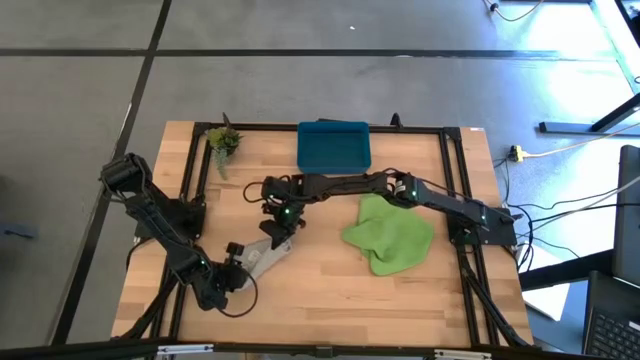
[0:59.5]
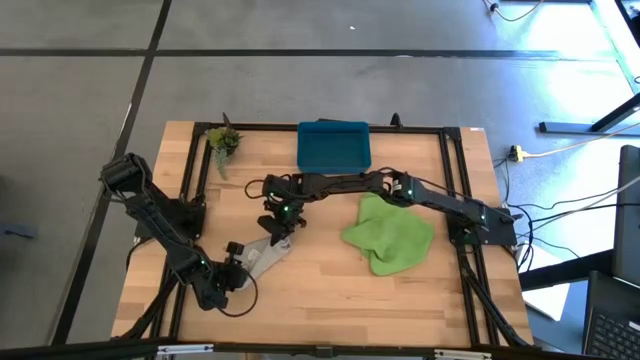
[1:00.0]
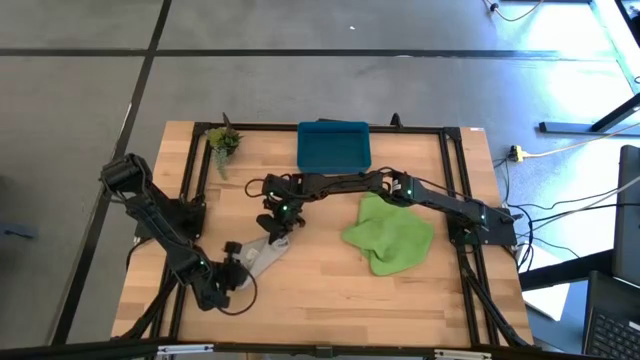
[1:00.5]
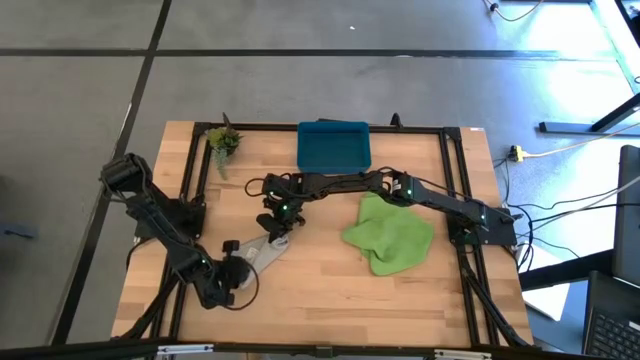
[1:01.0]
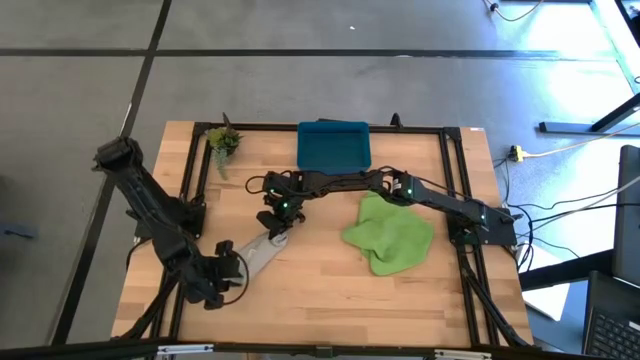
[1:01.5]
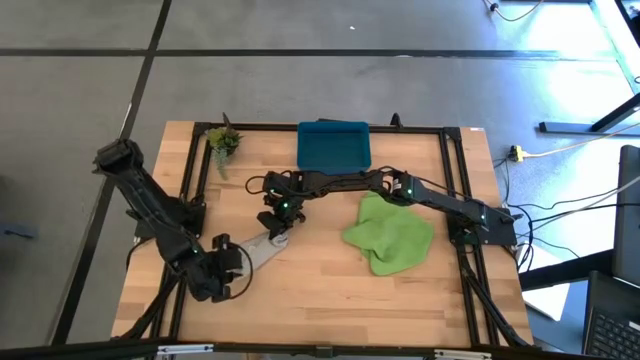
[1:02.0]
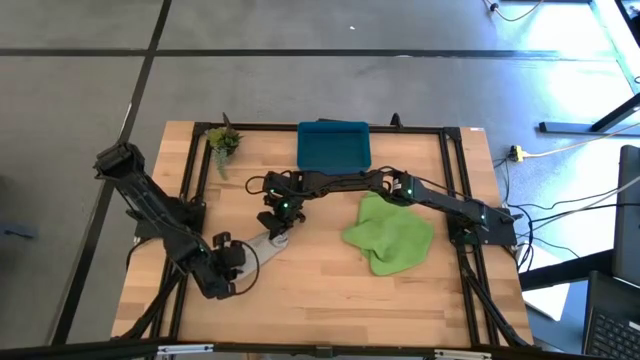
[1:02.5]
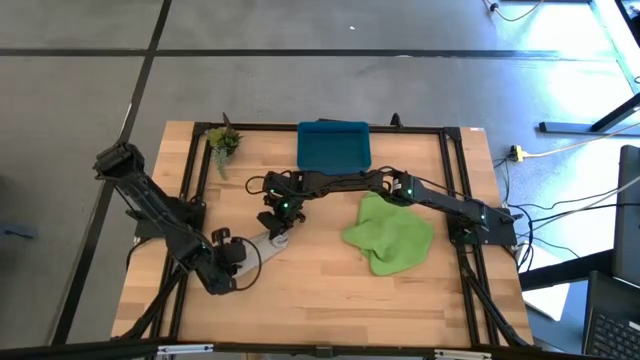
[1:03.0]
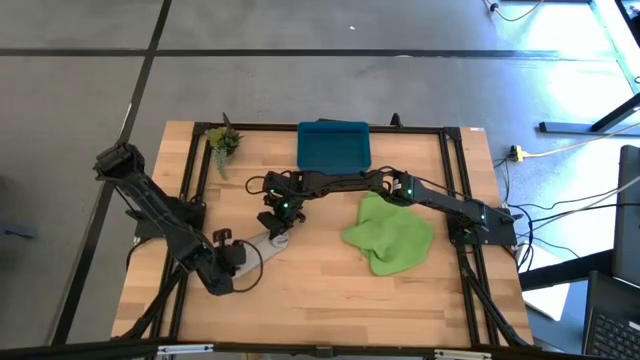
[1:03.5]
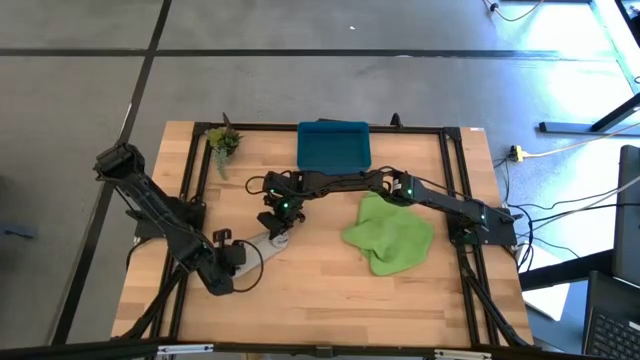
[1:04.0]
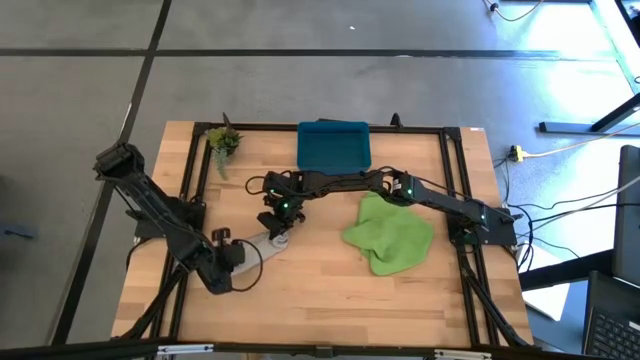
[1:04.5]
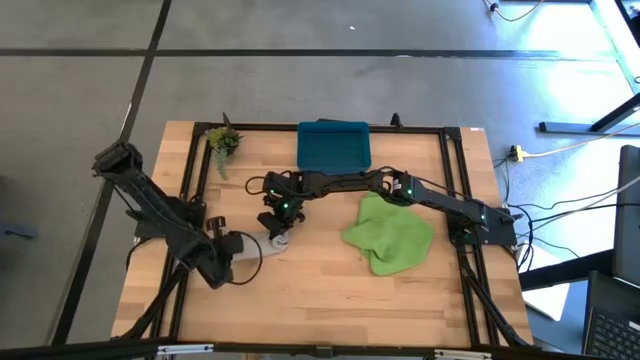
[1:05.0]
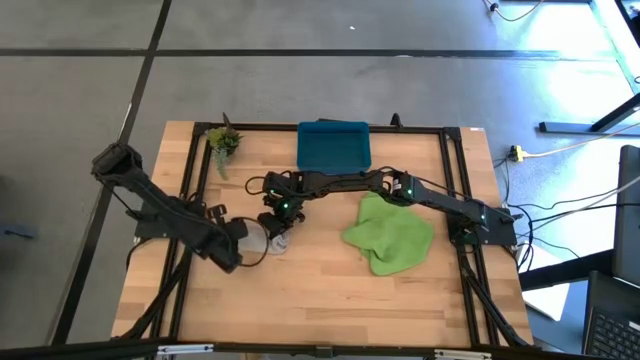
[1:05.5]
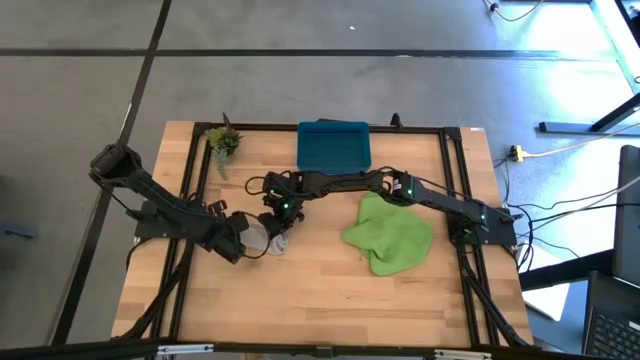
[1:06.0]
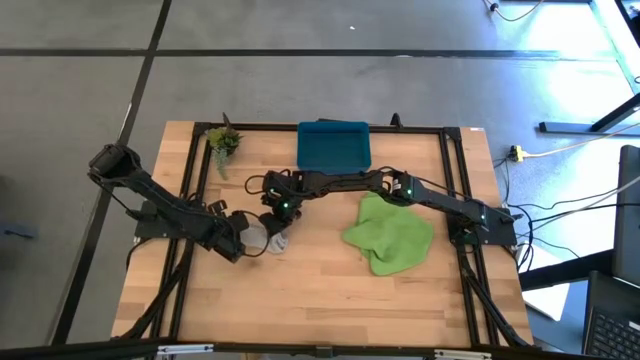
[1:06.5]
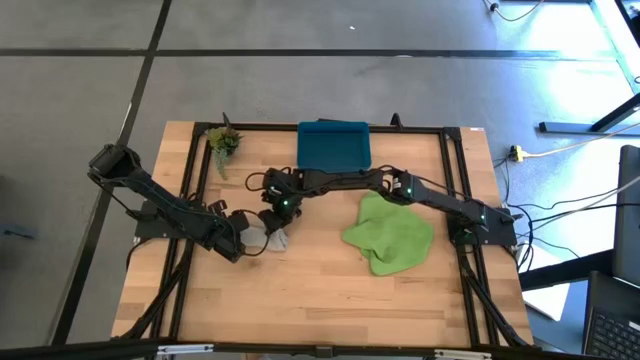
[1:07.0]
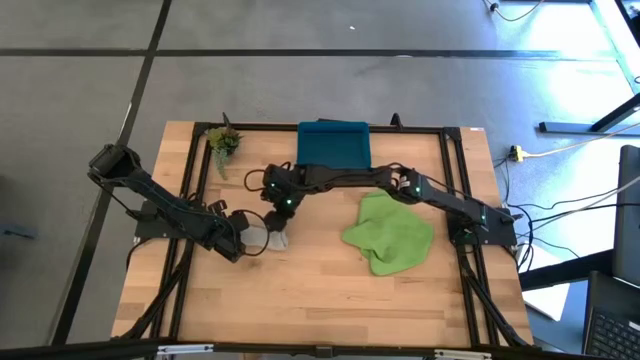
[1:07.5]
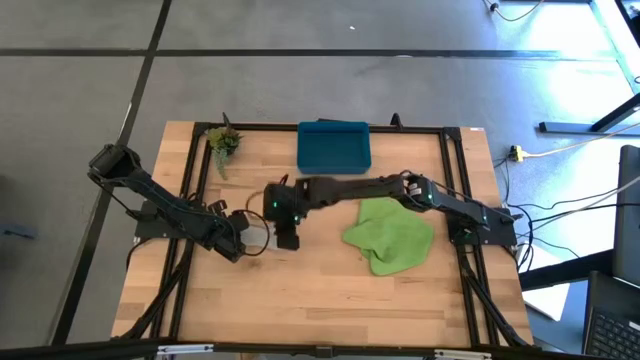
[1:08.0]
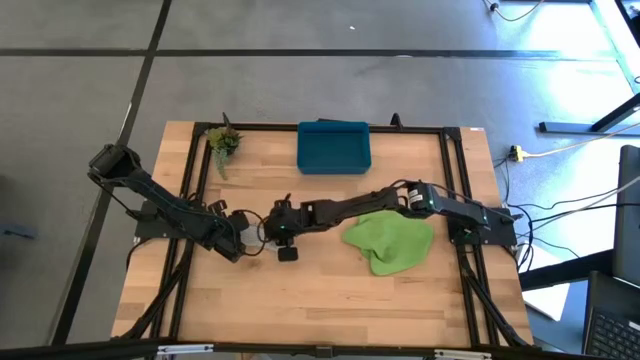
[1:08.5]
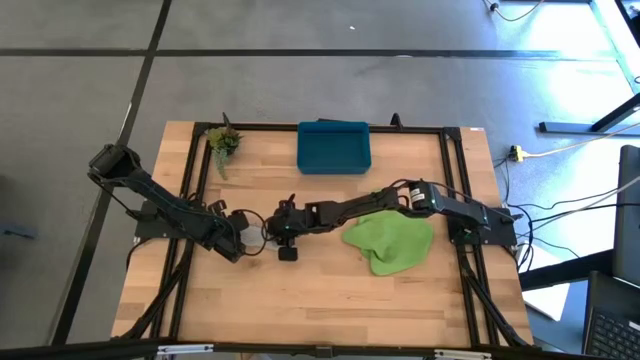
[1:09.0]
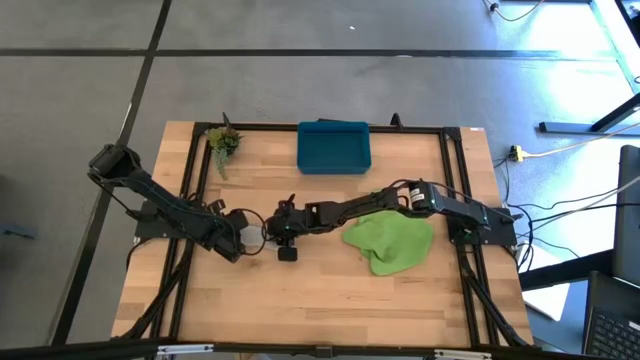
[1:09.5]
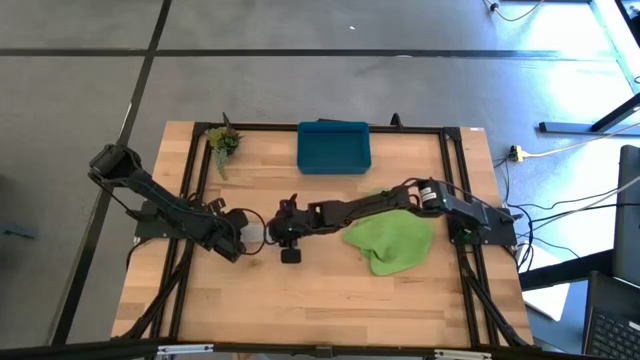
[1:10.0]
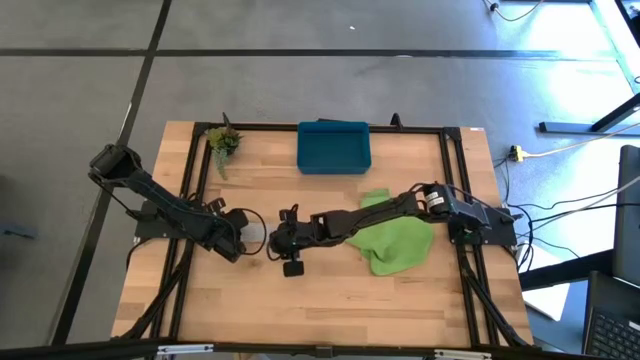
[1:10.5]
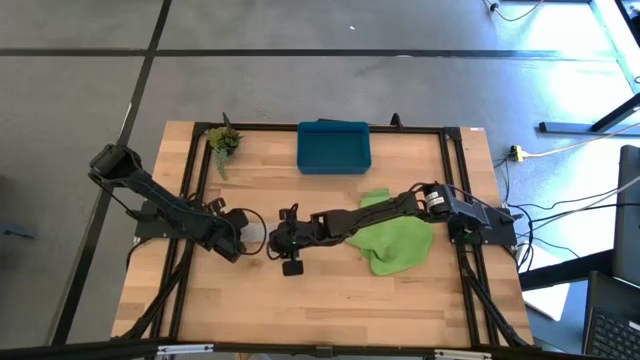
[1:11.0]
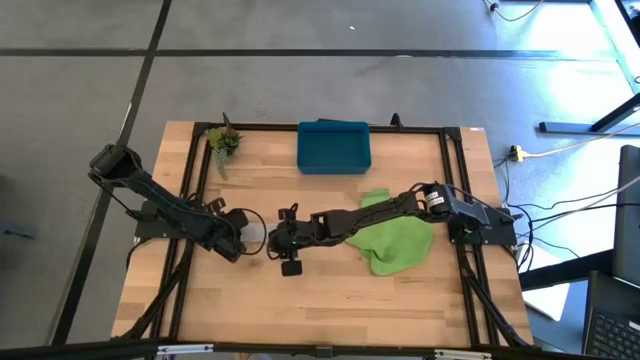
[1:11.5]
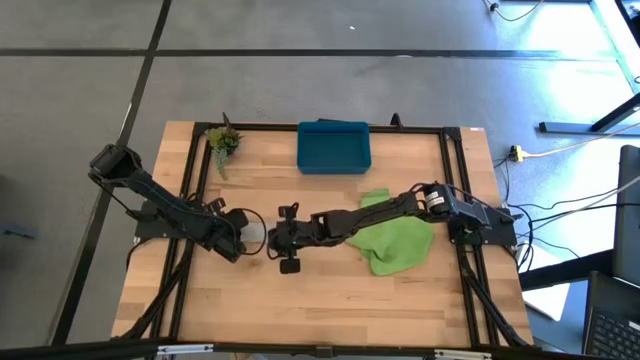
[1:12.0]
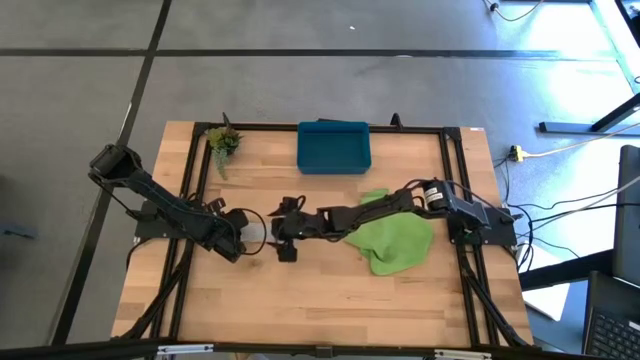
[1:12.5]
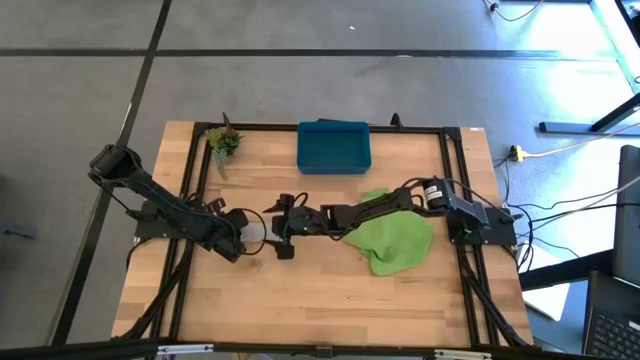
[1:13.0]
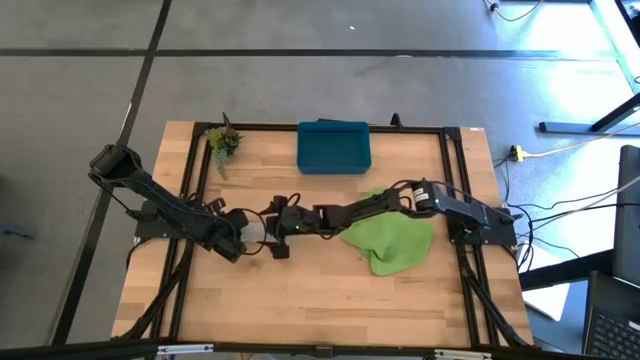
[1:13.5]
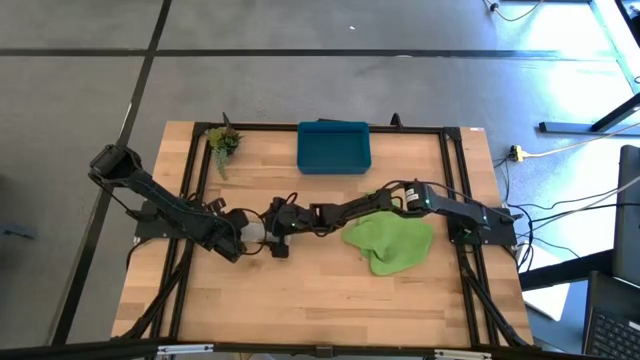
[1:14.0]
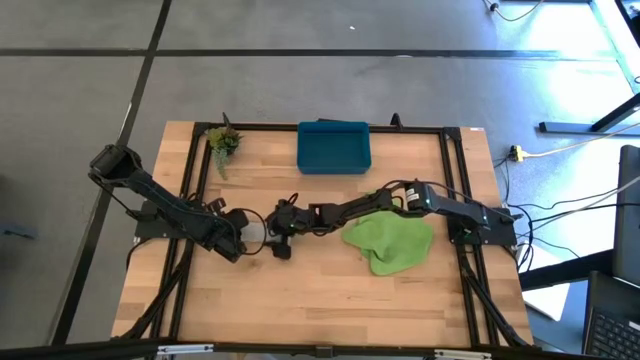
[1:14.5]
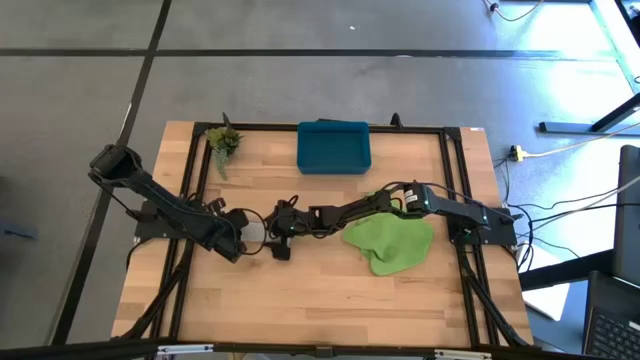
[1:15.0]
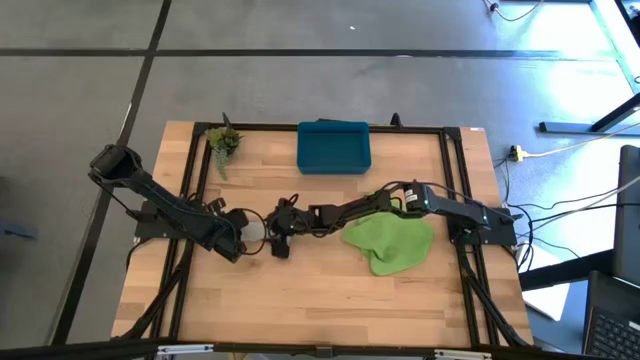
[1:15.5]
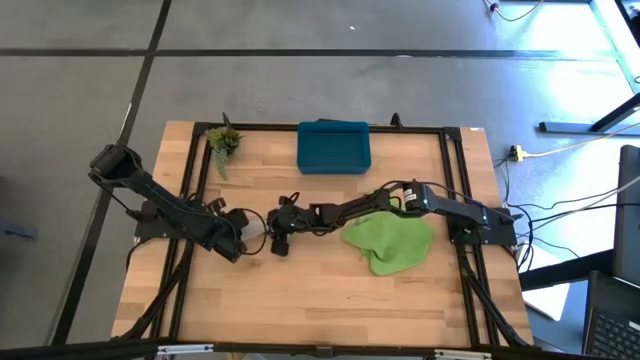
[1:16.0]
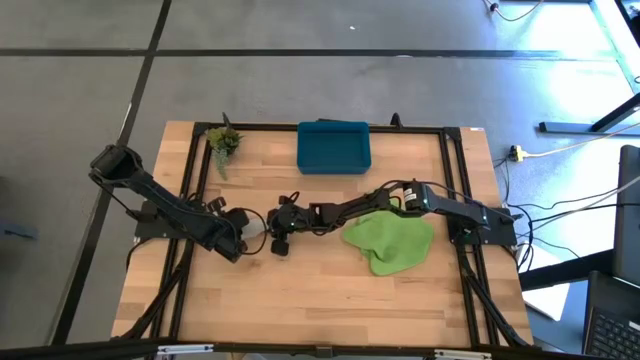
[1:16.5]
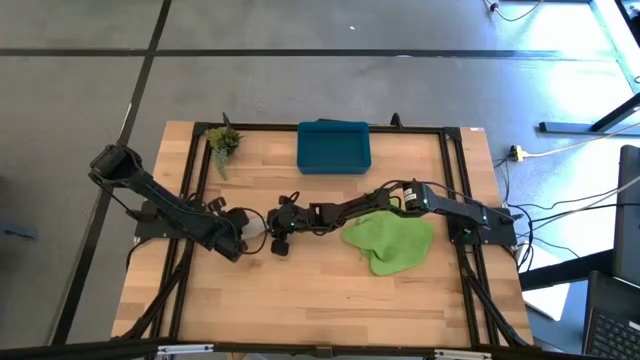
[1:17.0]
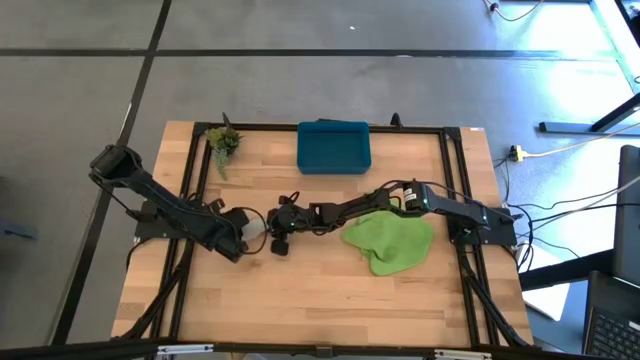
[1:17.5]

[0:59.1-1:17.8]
Task: Roll microfiber towels into tight, uniform cylinder then place into a basket
Roll the gray microfiber cloth

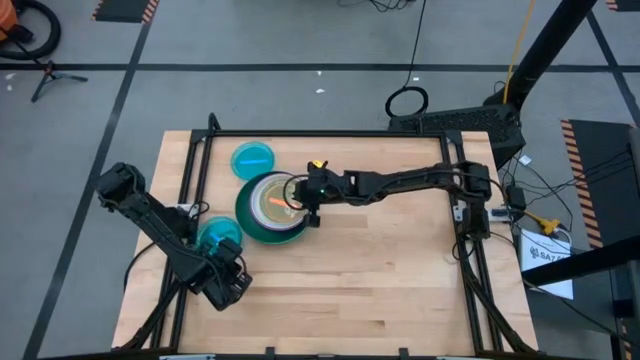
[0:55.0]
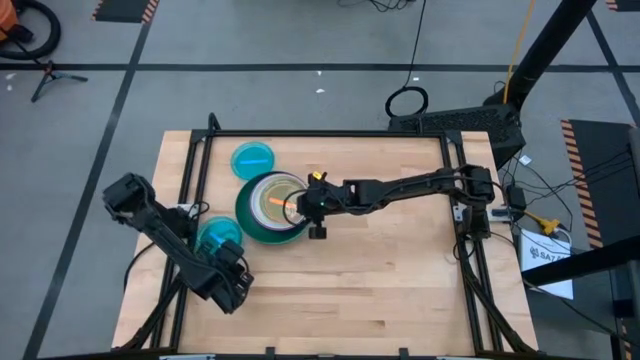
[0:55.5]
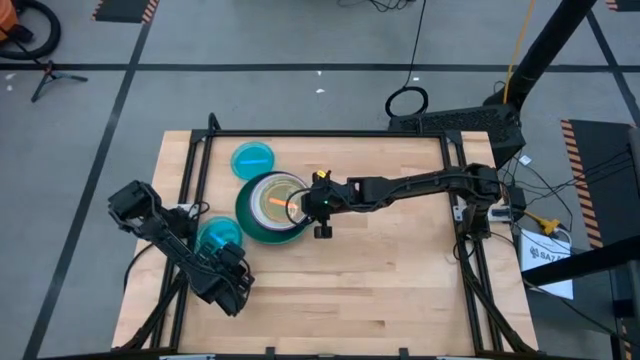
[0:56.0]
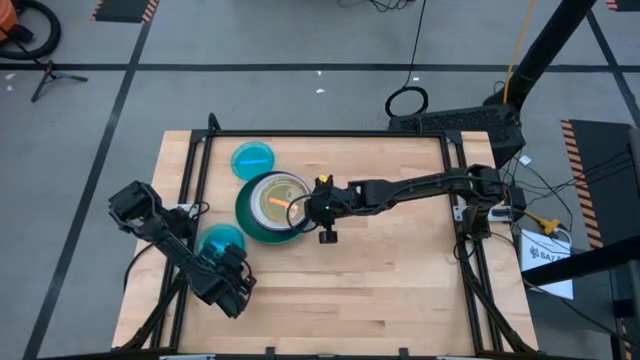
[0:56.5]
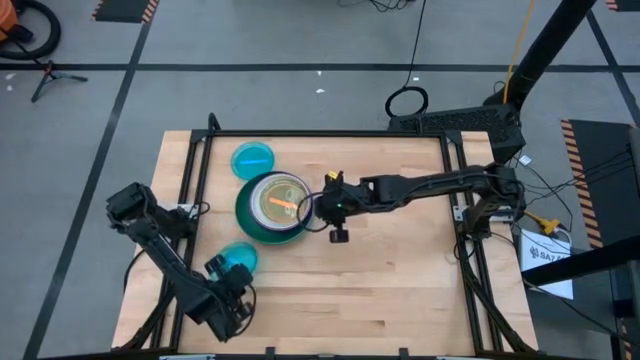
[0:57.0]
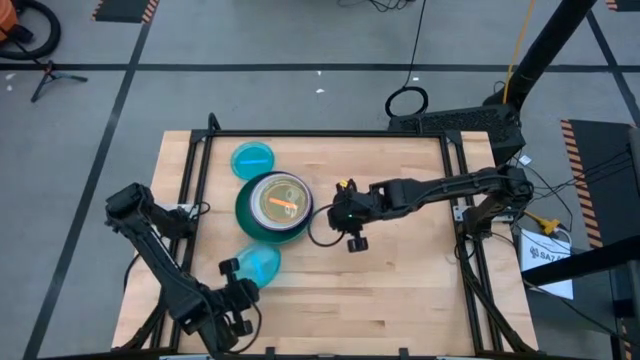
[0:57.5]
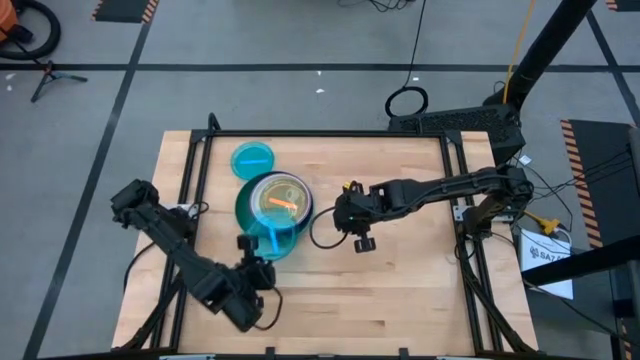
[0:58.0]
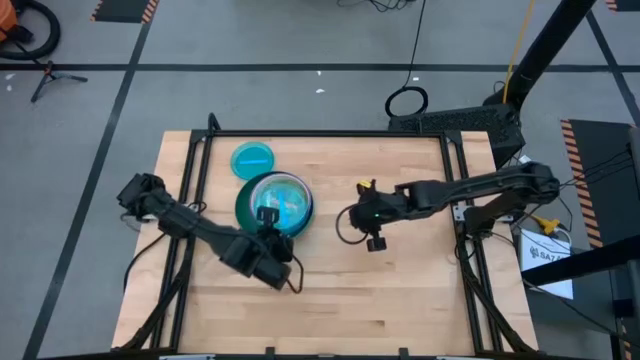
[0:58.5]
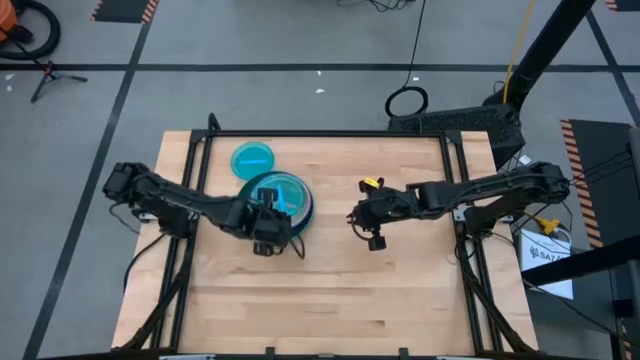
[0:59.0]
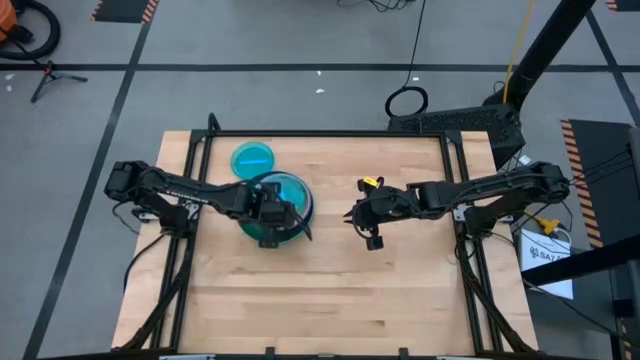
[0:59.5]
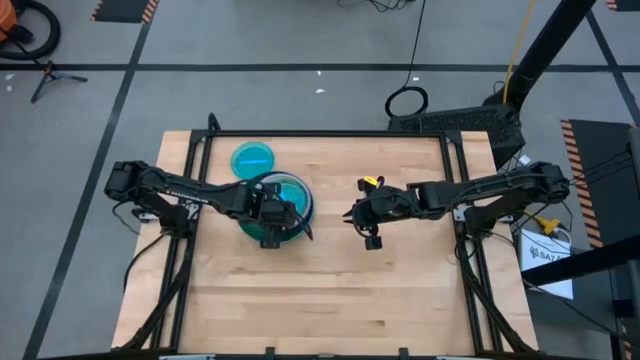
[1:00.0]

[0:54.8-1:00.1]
Task: Stack plastic plates
Stack the bottom blue plate on top of the orange plate
